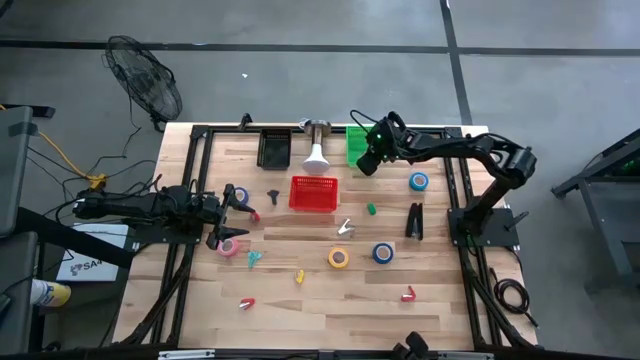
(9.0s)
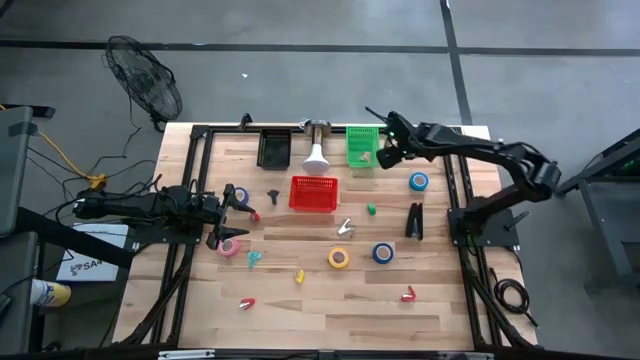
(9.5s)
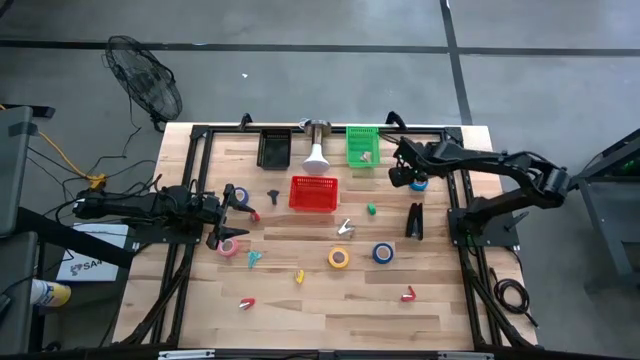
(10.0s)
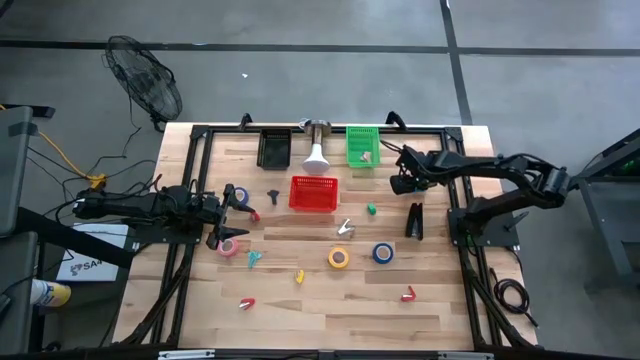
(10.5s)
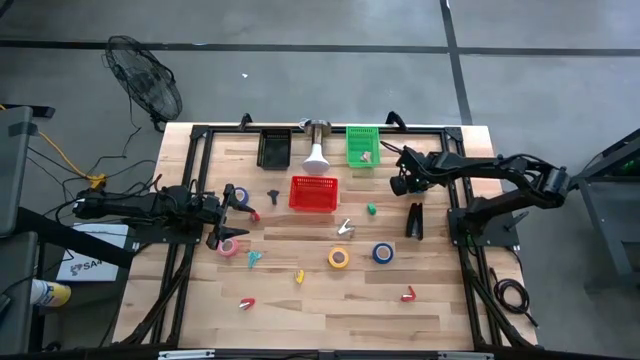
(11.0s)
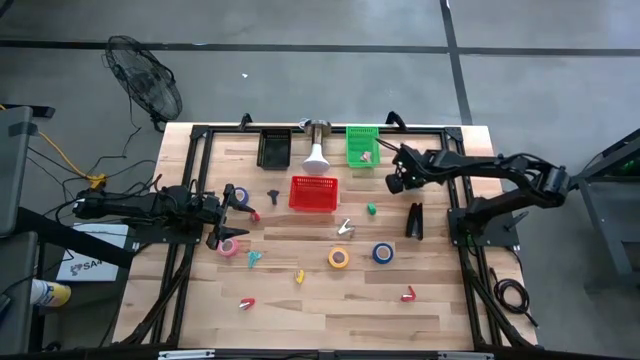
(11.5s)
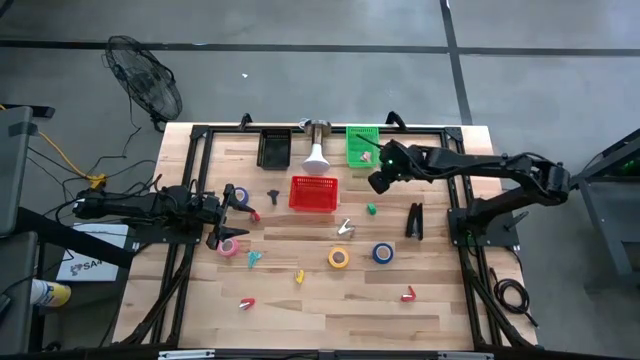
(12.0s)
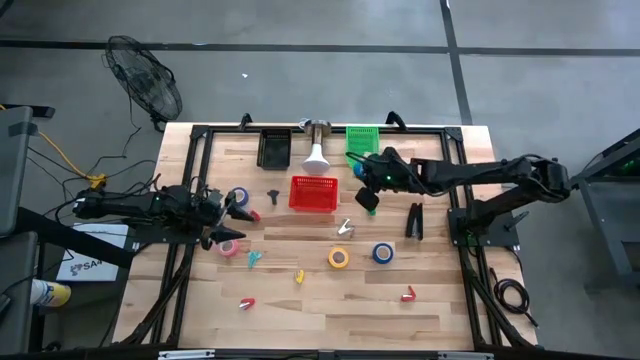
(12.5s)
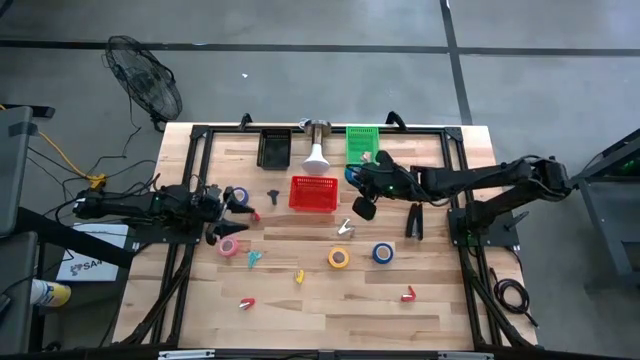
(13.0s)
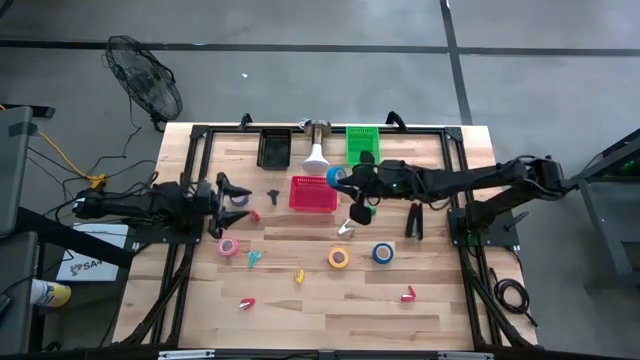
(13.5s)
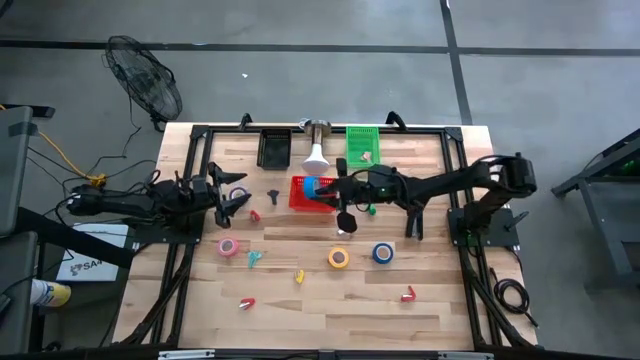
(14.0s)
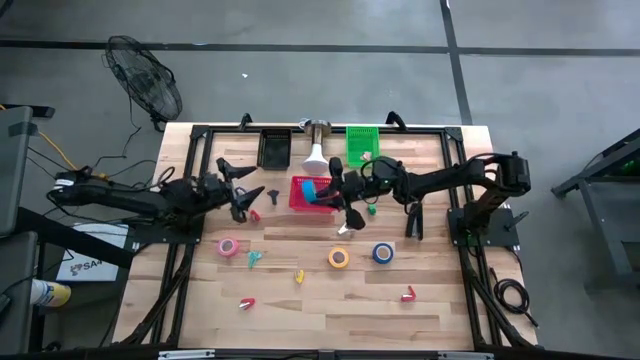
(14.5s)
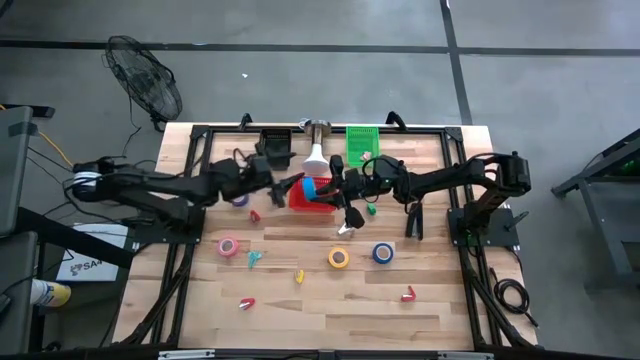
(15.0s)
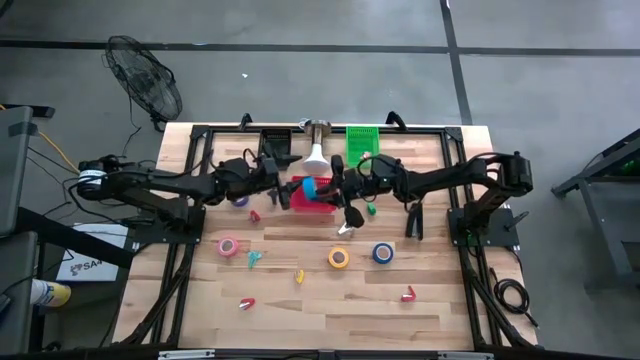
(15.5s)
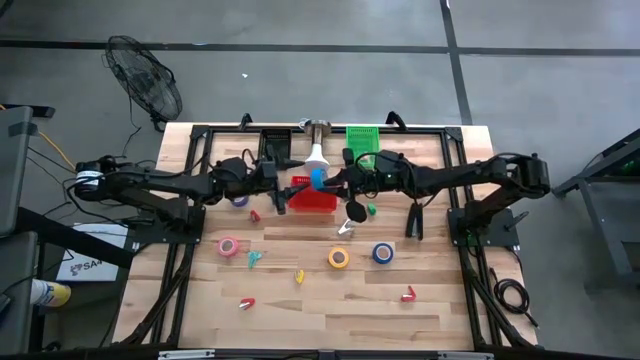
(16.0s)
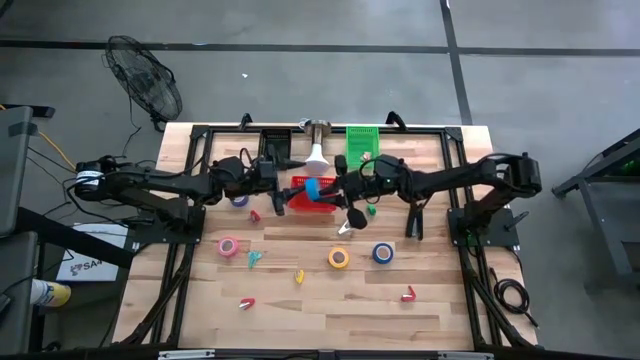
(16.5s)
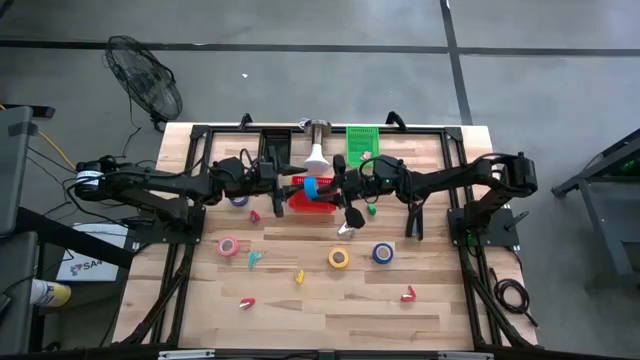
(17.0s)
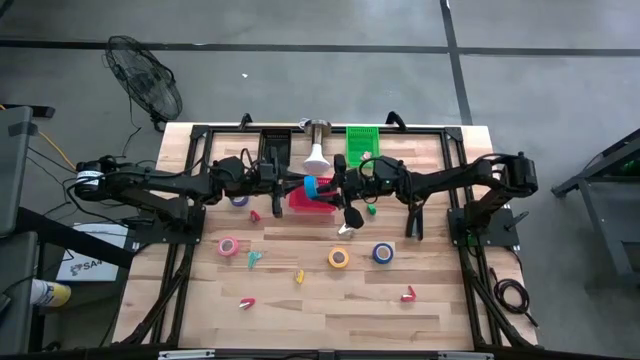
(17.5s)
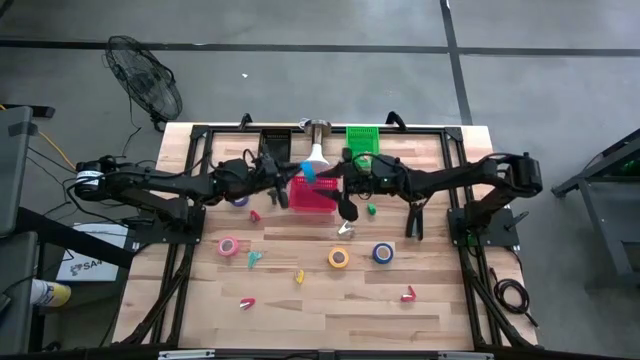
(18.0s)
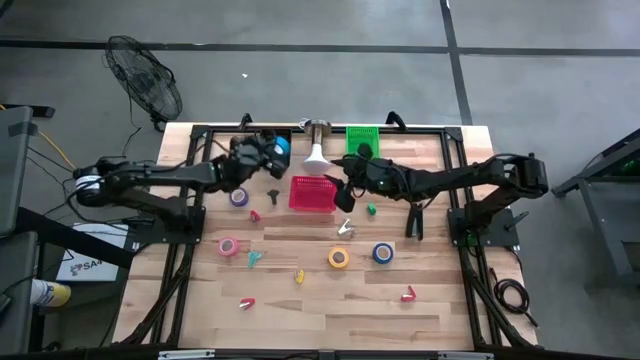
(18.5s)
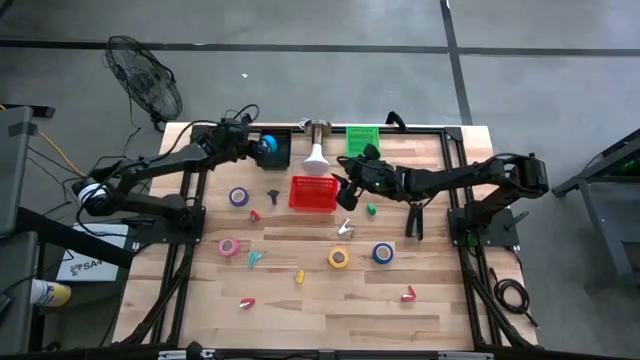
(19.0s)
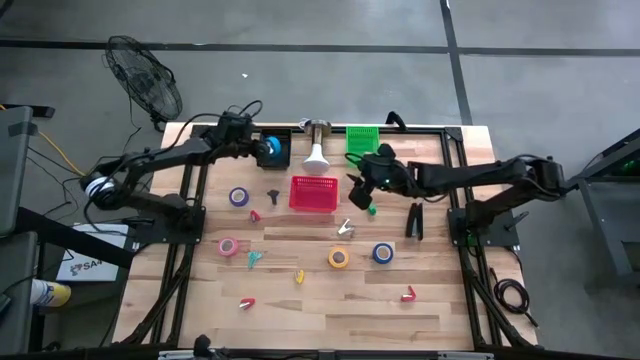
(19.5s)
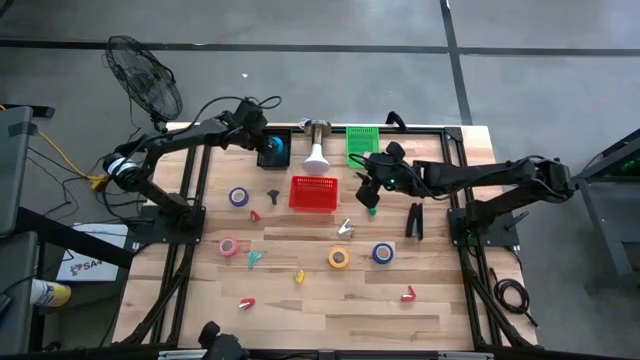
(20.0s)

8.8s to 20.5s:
Task: Pick and place Stapler, Stapler remover, tape
Put the light blue tape into the black basket

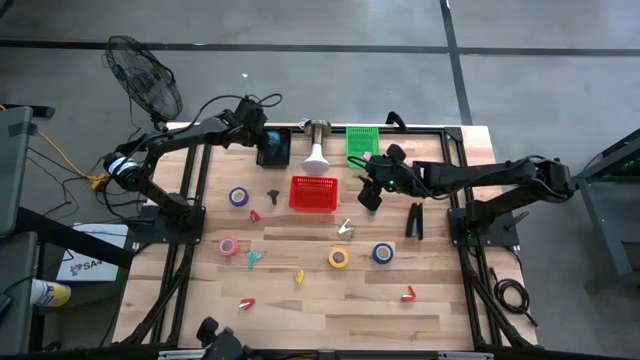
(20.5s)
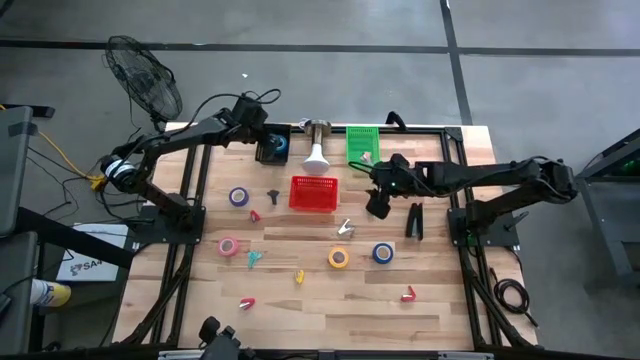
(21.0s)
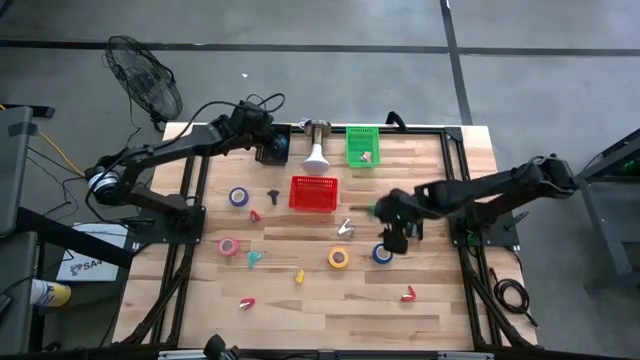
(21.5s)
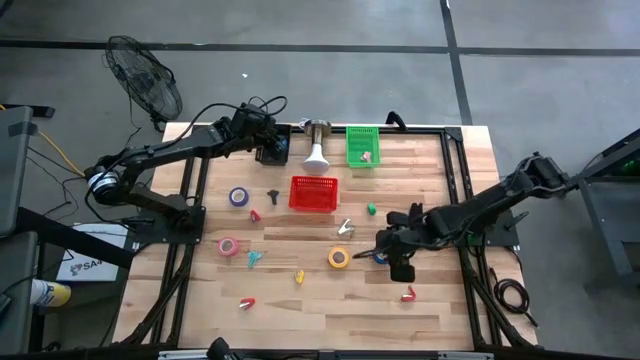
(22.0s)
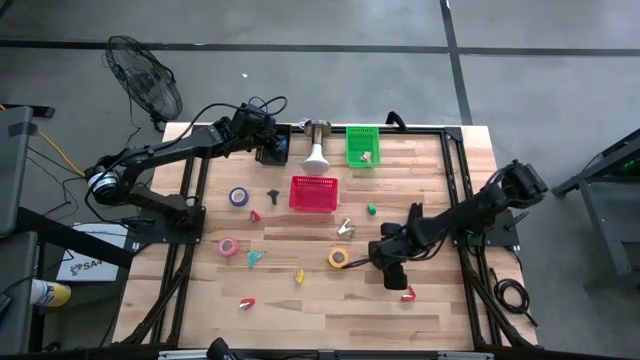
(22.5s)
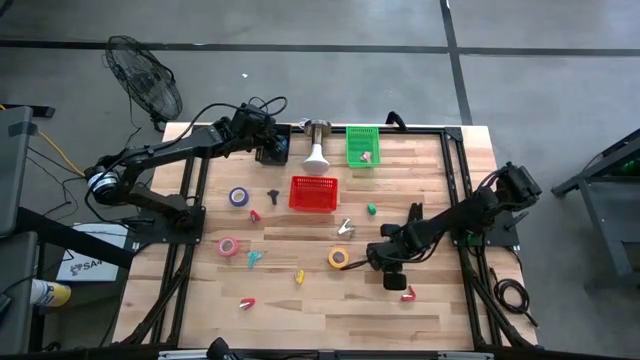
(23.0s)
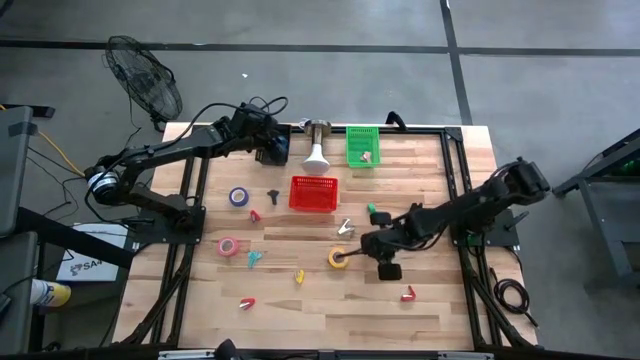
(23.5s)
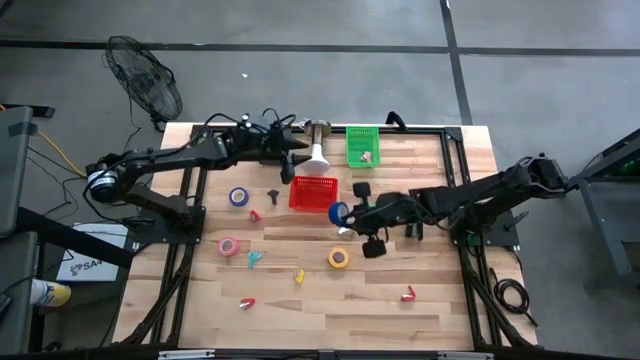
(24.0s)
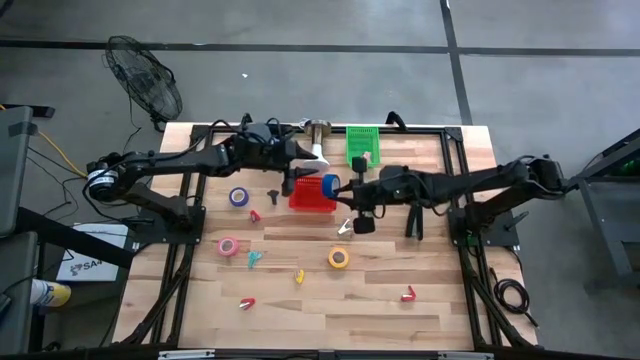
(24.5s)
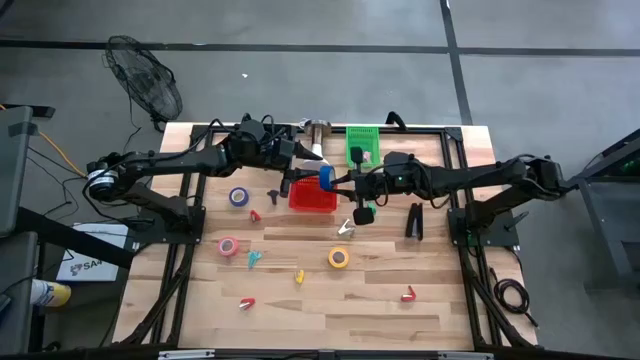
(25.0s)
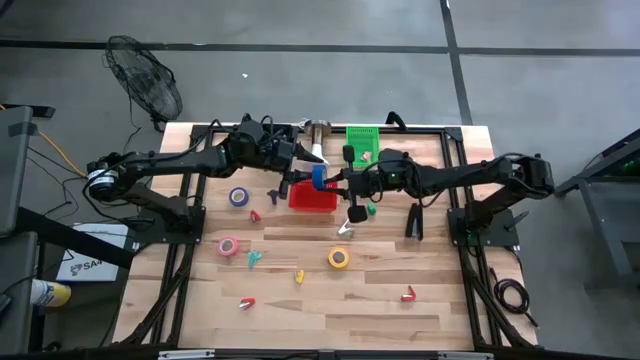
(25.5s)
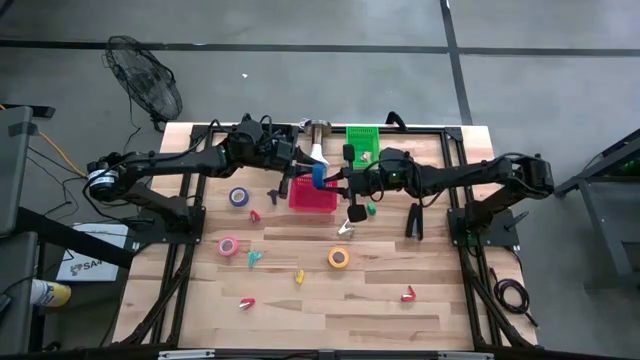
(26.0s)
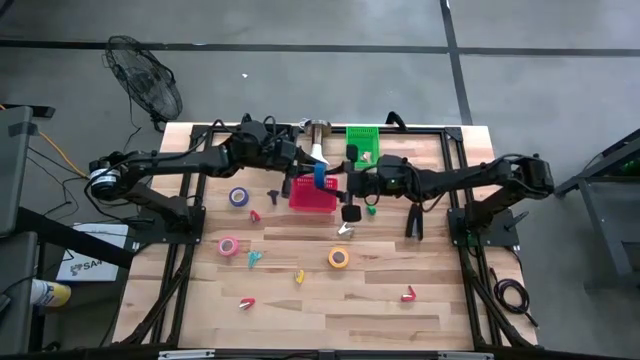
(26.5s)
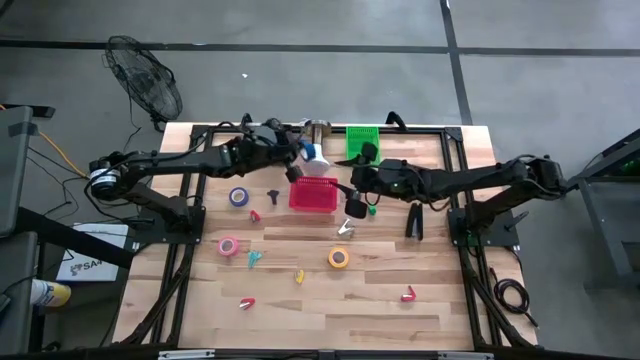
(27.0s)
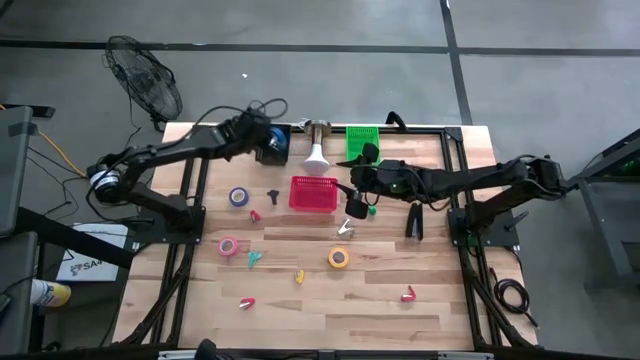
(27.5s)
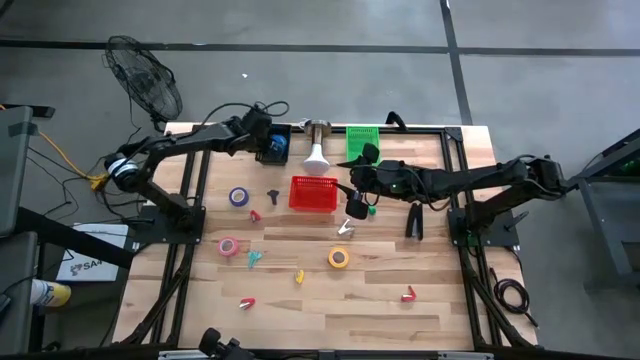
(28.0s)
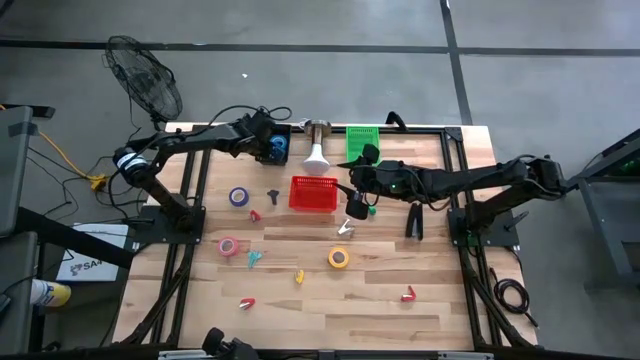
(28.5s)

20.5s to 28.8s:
Put the bottom blue tape into the black basket

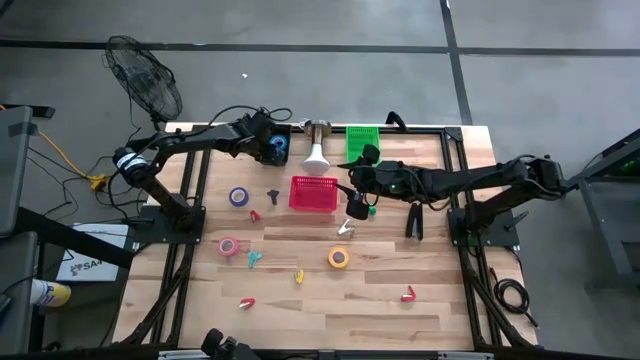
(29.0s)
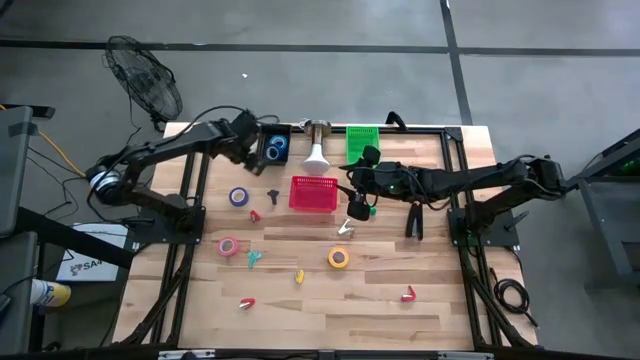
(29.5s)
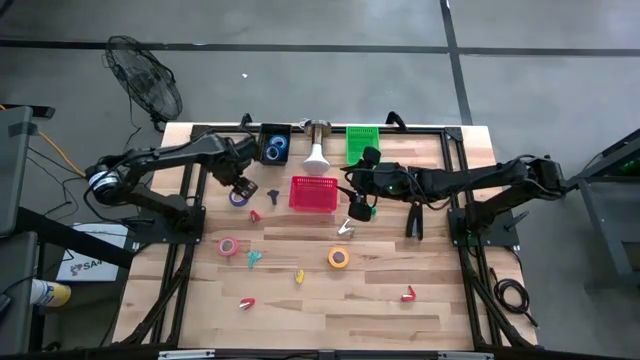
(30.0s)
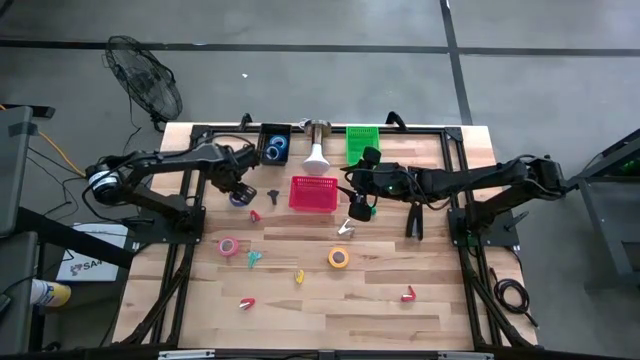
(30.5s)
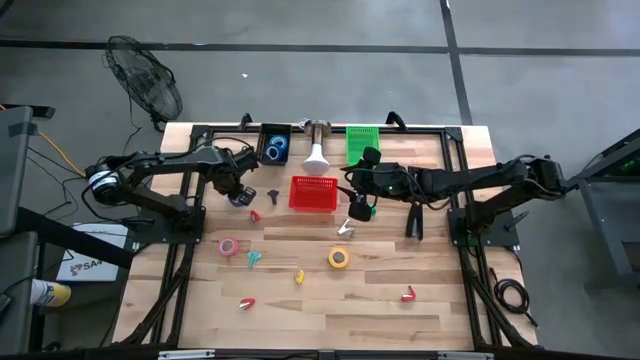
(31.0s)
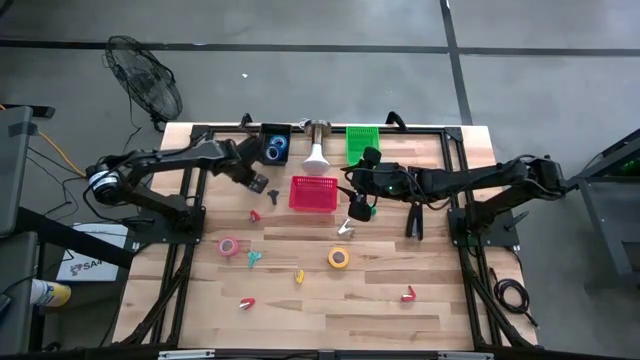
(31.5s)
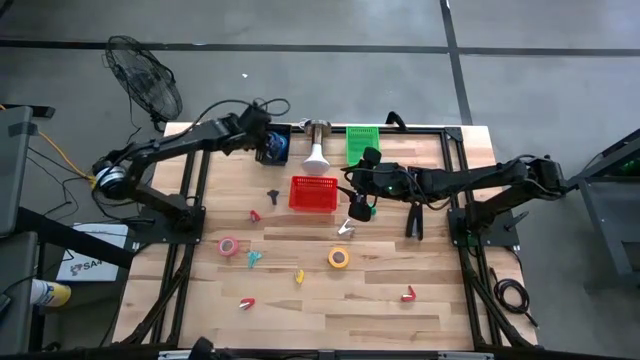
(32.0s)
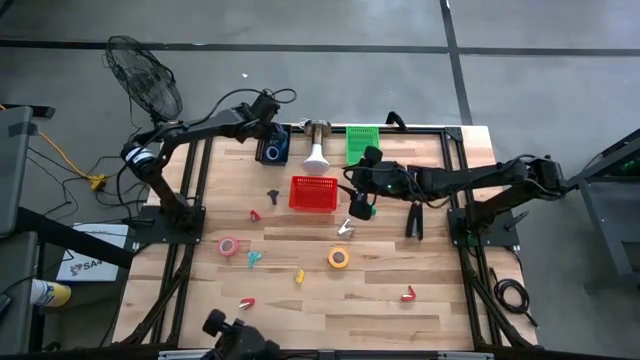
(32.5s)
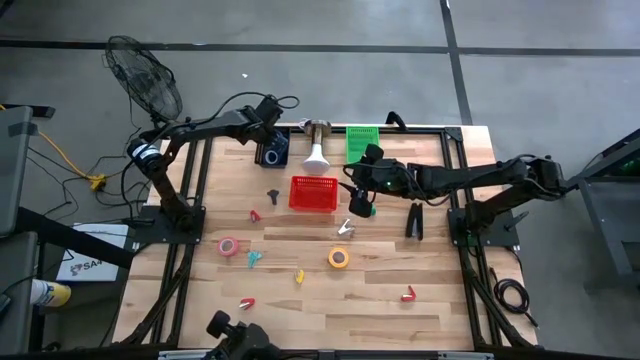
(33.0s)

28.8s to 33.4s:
Put the blue tape into the black basket
